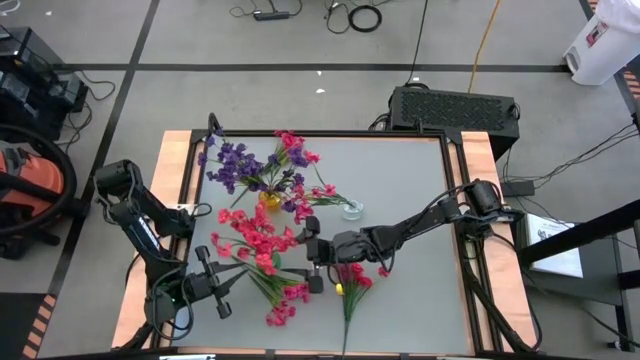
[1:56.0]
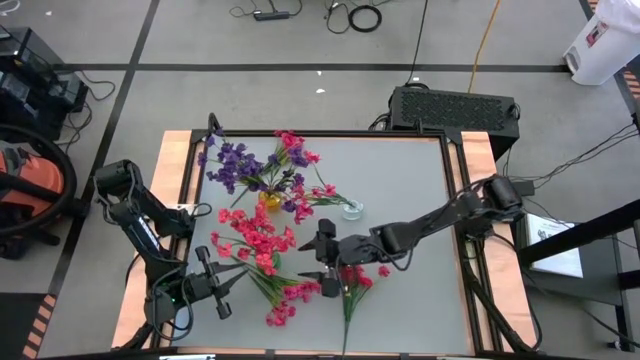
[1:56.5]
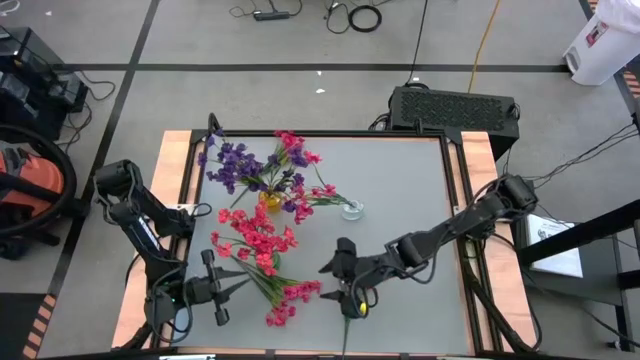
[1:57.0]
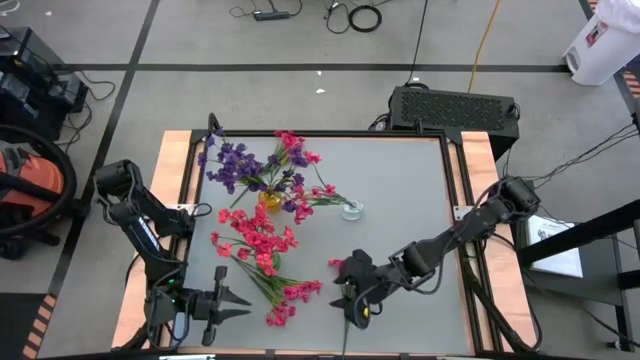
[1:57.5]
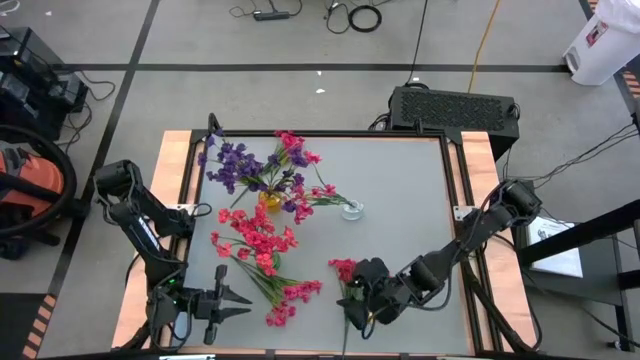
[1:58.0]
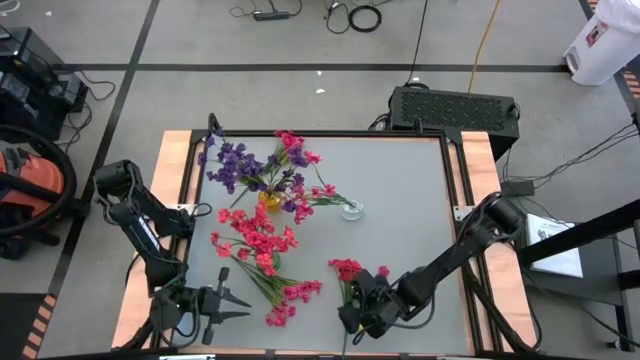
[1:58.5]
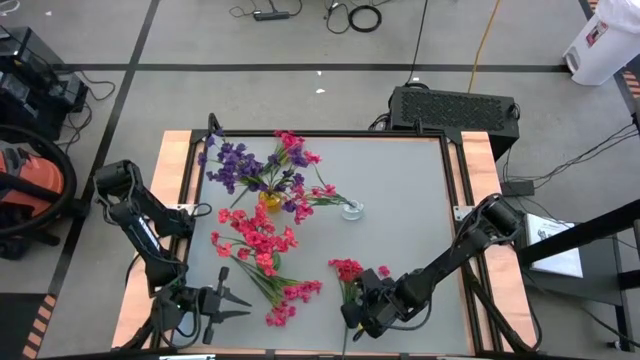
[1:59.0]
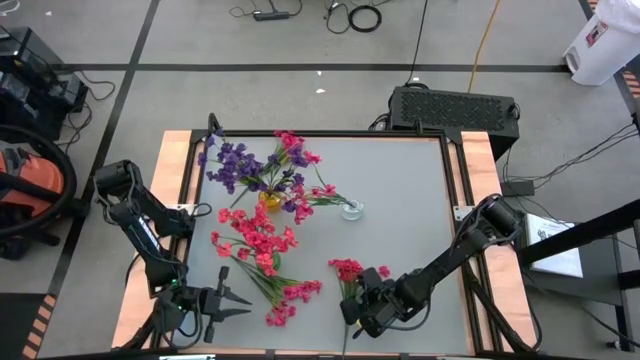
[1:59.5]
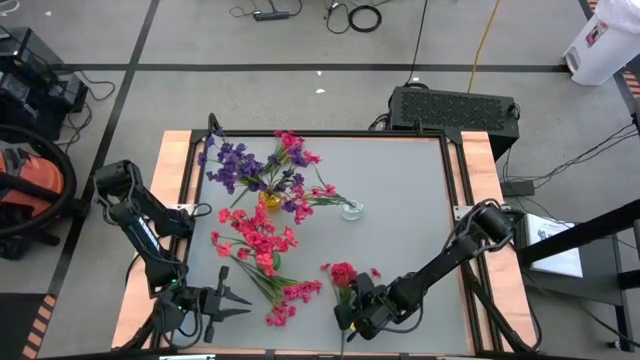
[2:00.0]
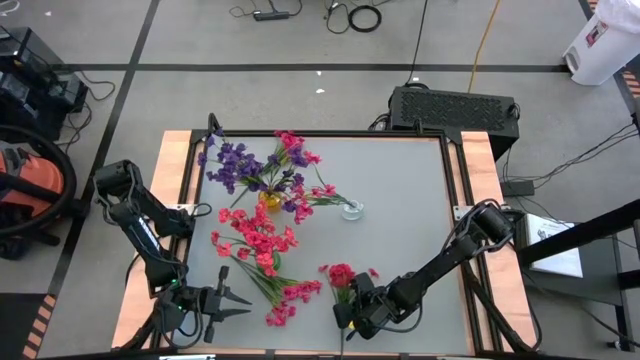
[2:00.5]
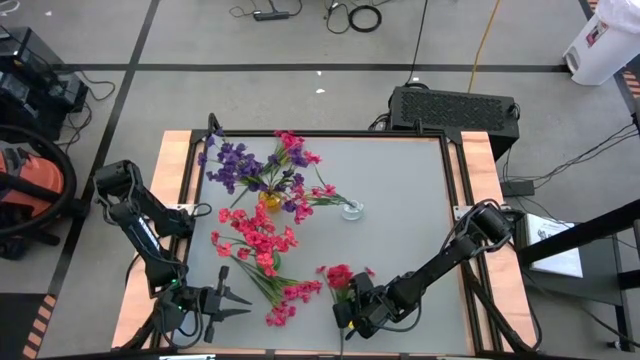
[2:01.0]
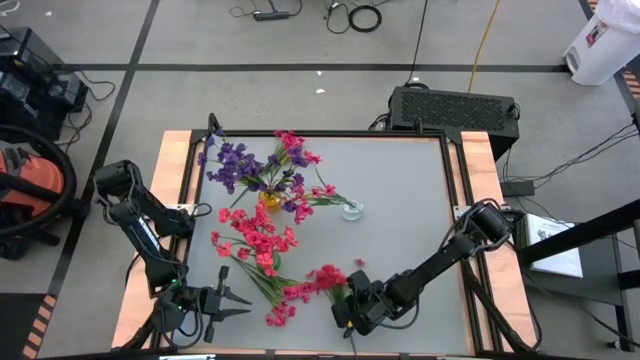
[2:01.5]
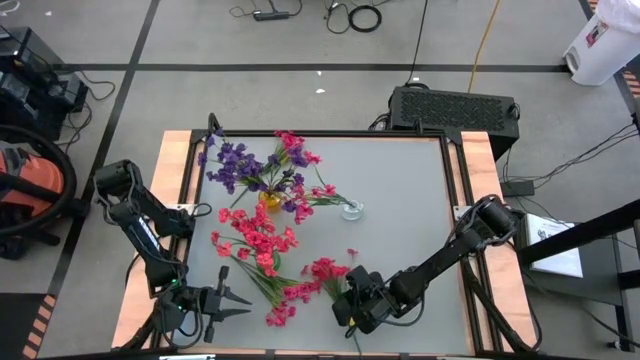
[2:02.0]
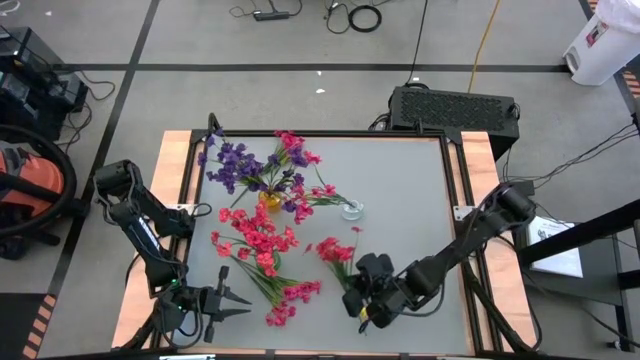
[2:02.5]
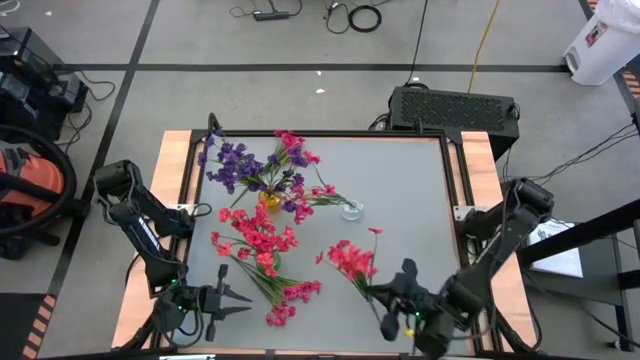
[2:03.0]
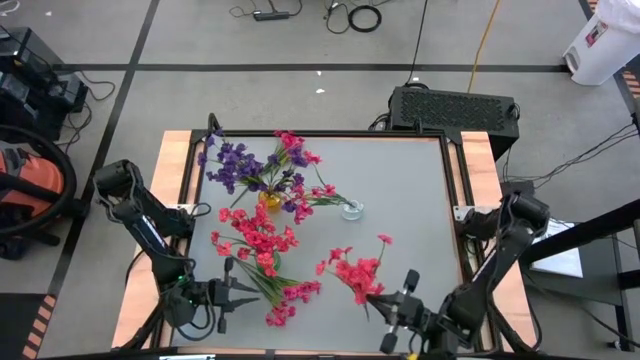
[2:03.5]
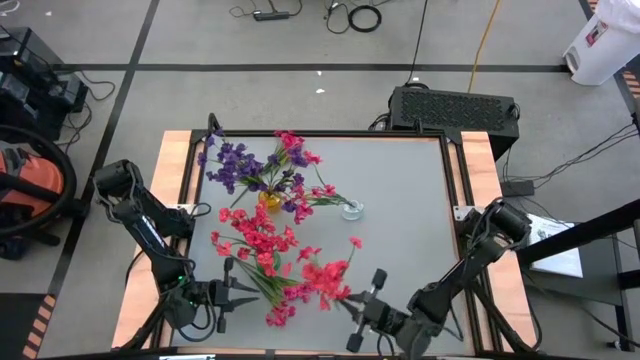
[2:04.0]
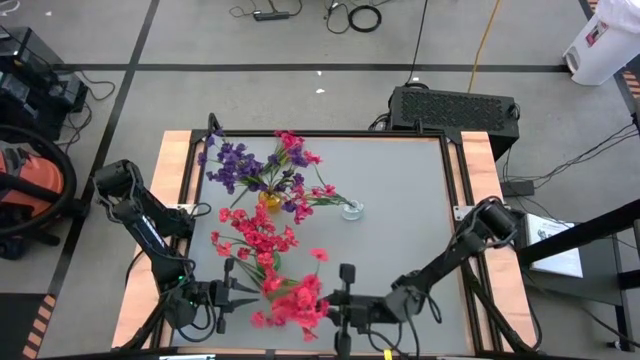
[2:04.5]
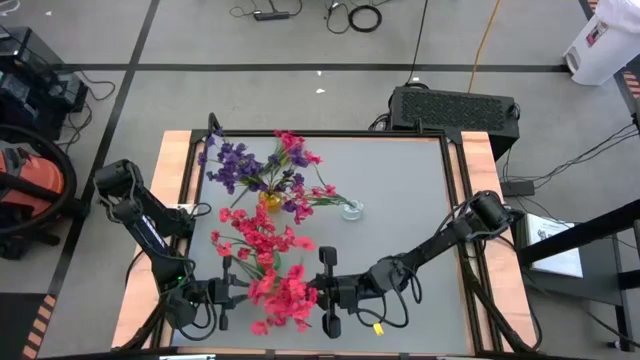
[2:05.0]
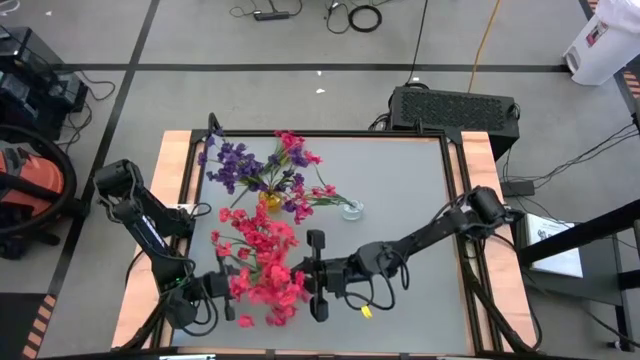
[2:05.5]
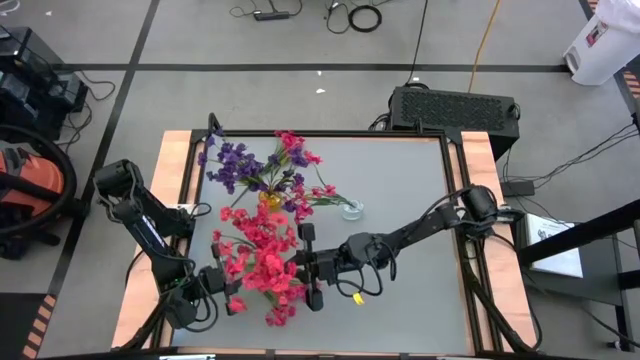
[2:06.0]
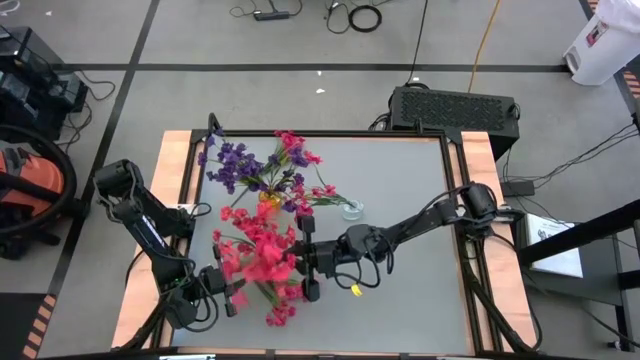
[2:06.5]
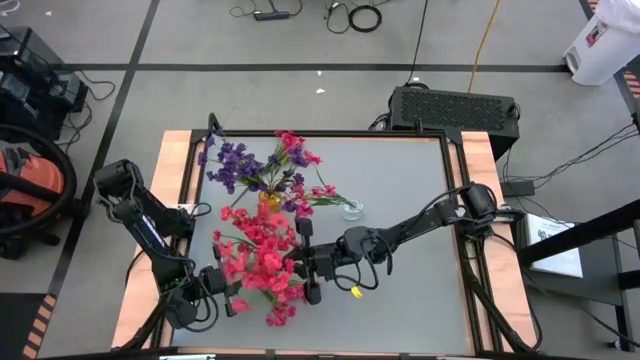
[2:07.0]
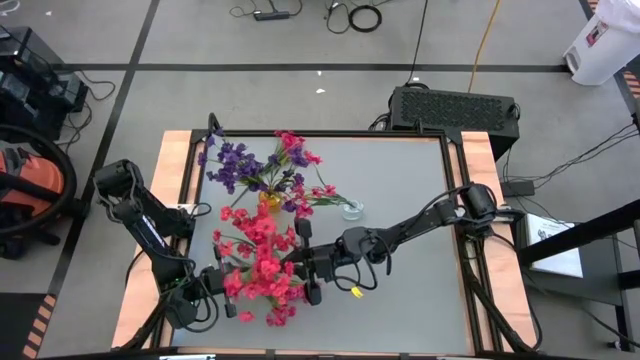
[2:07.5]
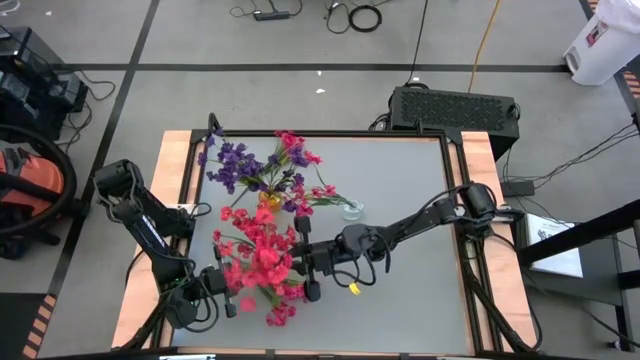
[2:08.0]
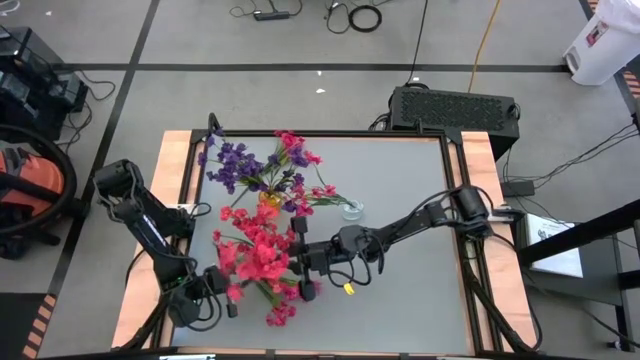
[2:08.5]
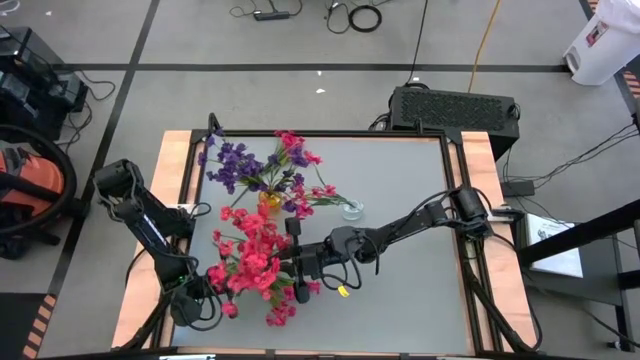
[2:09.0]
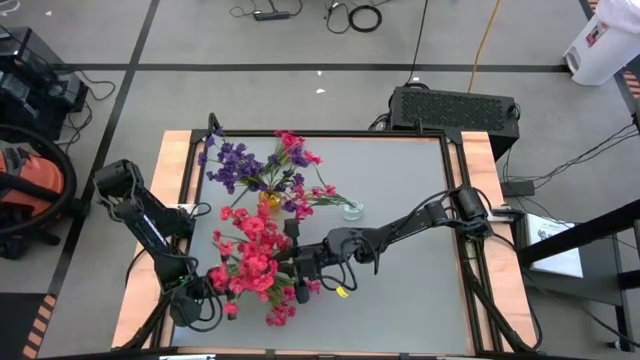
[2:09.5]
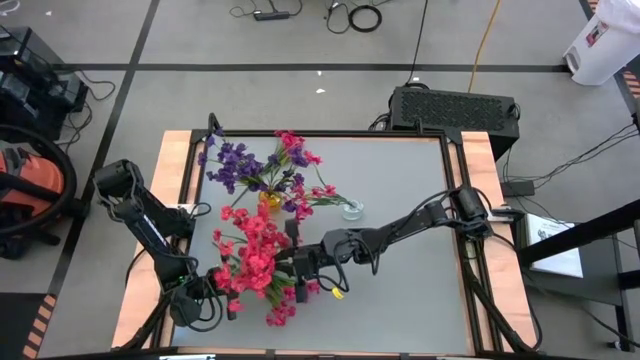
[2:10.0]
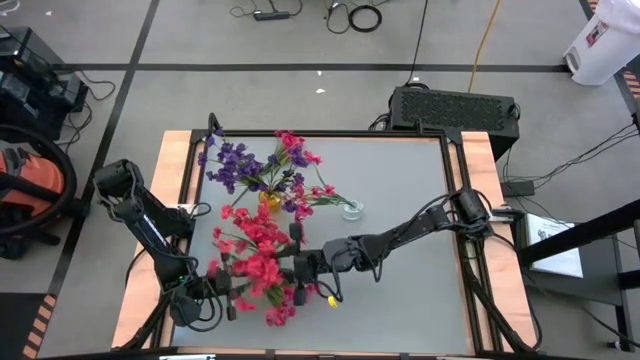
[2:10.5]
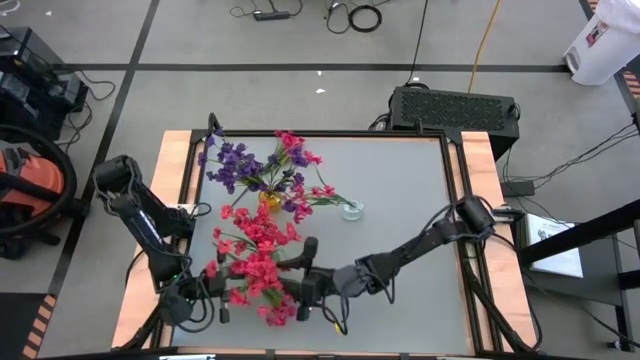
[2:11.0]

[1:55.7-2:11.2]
Task: Sort flowers into vase by color
Put the orange flowers into the green vase

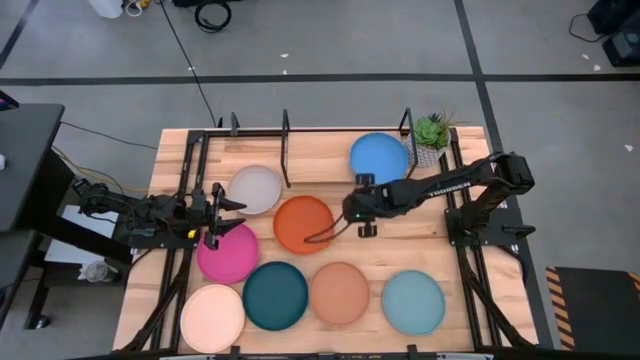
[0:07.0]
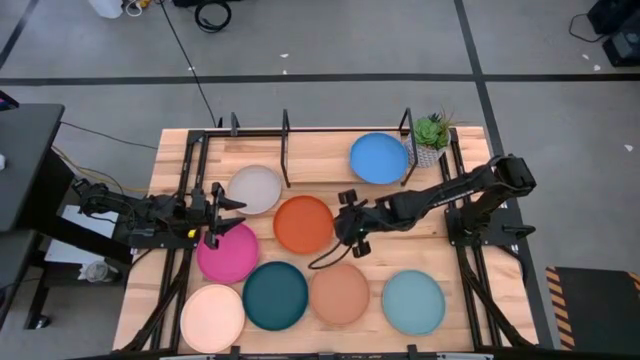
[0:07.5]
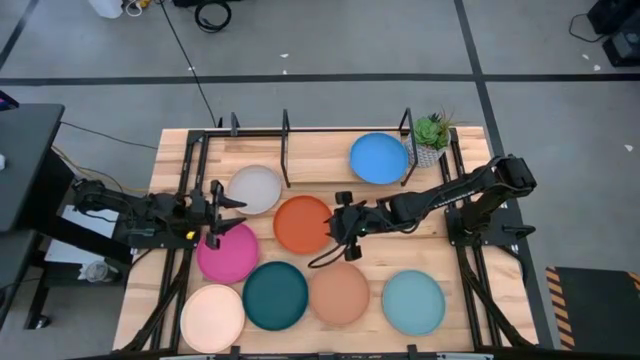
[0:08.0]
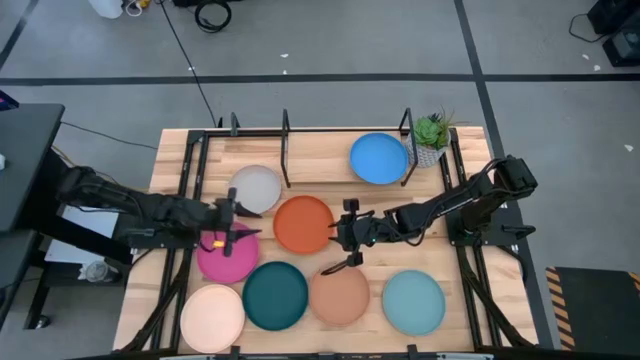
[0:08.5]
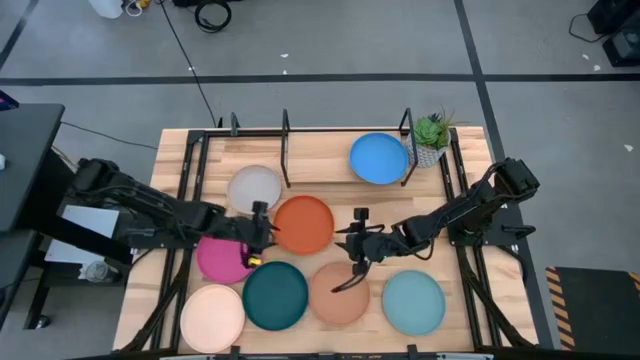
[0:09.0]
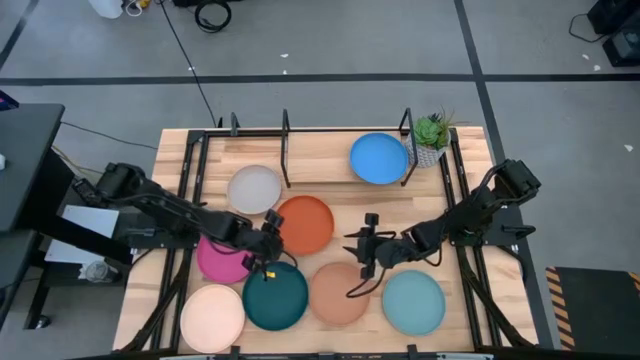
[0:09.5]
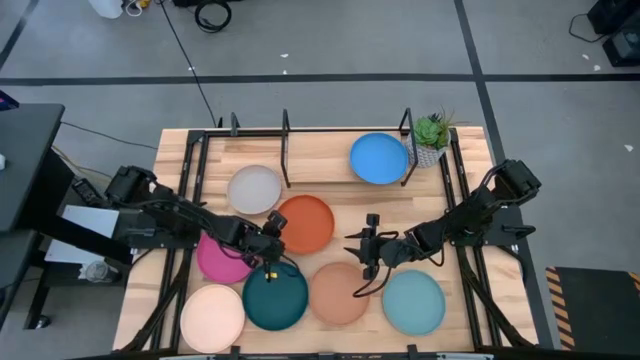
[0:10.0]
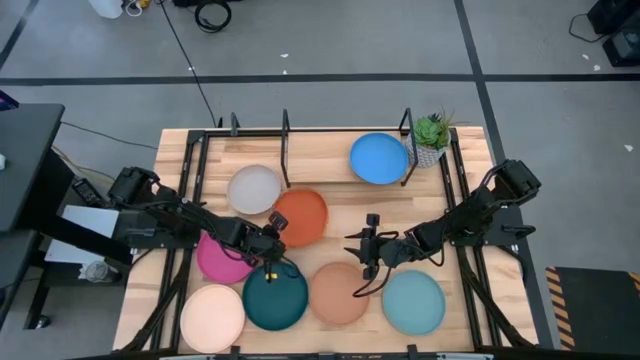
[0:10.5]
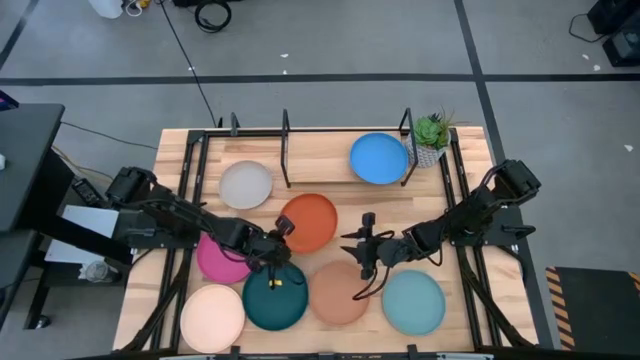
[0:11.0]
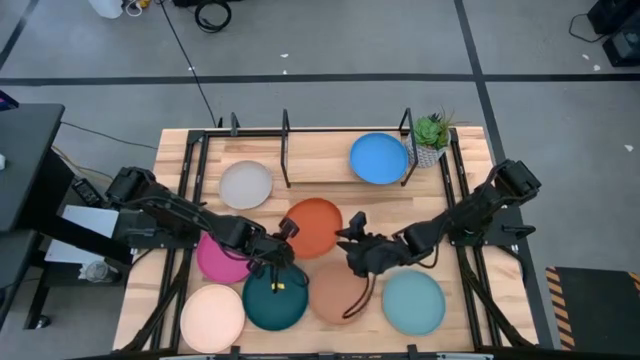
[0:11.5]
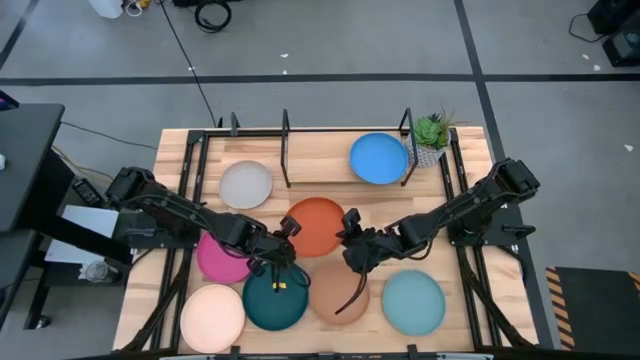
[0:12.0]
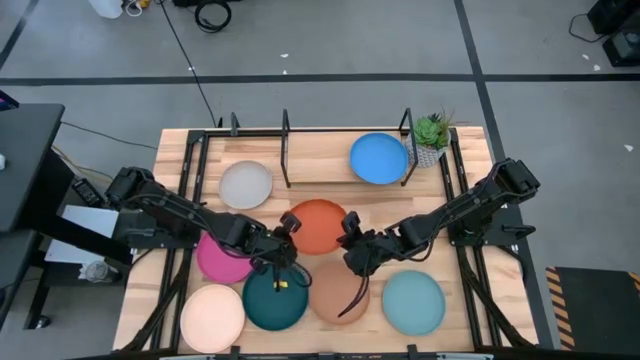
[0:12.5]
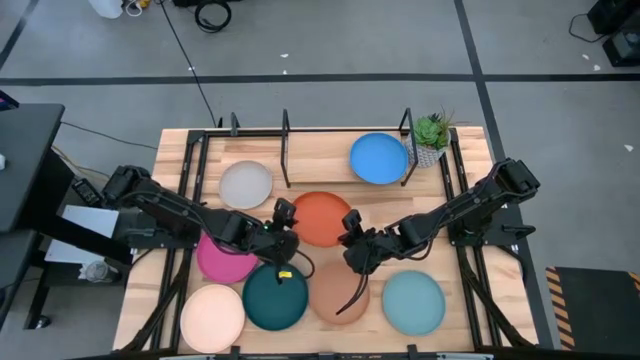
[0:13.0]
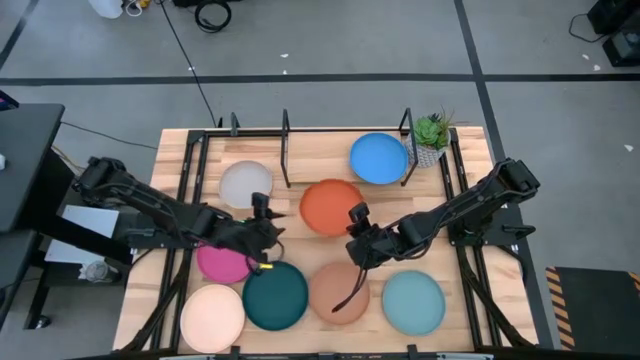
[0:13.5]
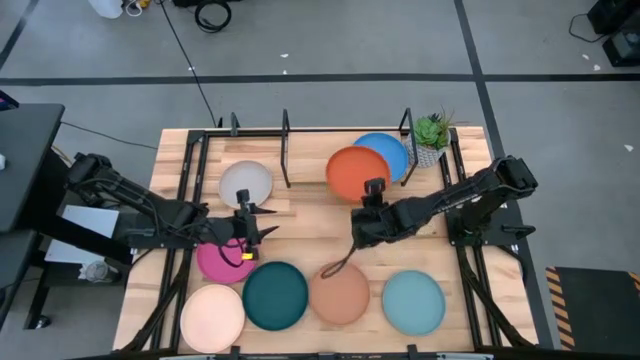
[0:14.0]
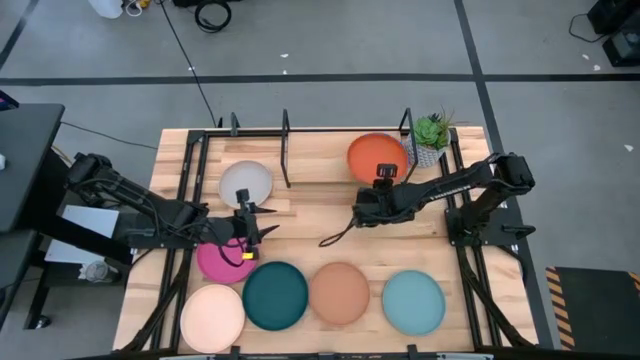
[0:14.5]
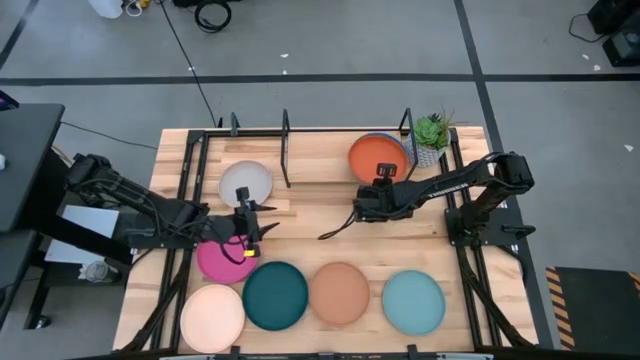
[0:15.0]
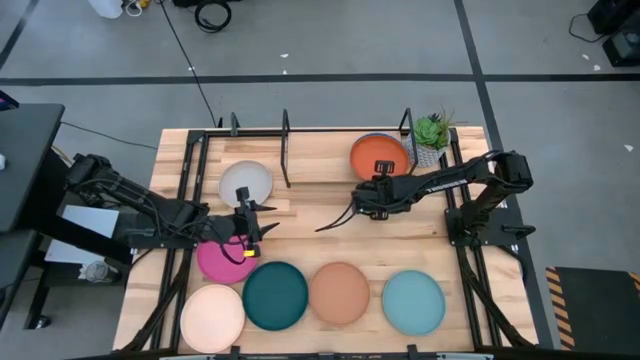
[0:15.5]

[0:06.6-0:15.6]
Task: Place and stack plates onto a shelf
Stack the orange plate on top of the blue plate on the shelf
